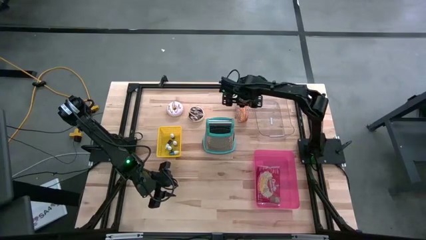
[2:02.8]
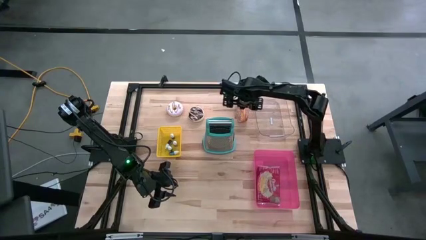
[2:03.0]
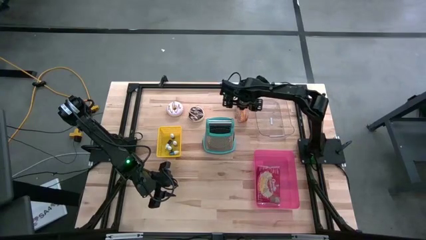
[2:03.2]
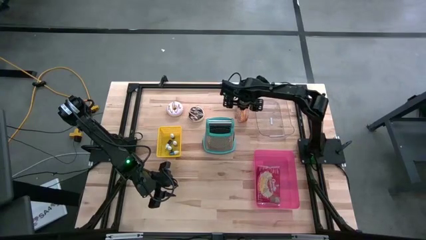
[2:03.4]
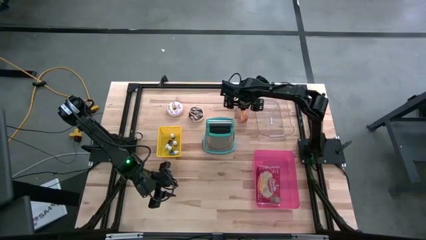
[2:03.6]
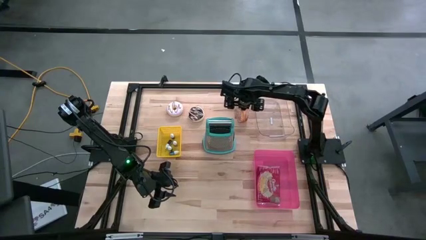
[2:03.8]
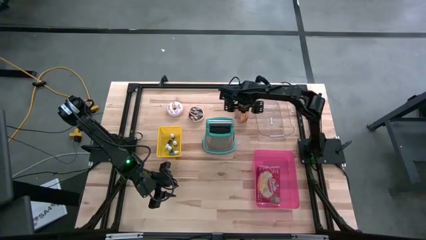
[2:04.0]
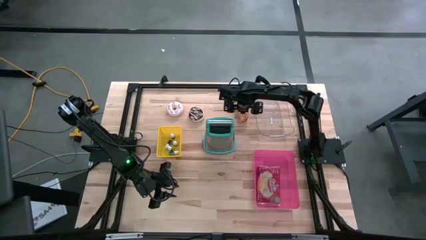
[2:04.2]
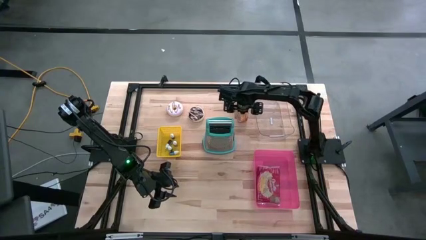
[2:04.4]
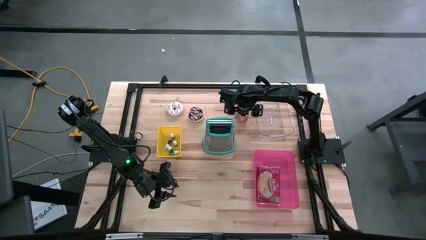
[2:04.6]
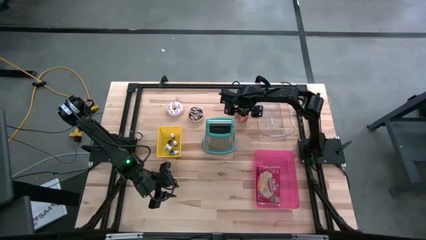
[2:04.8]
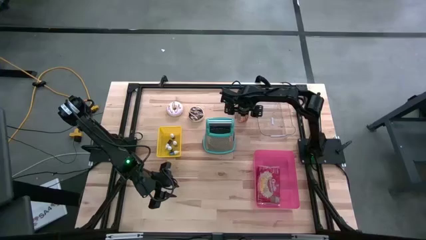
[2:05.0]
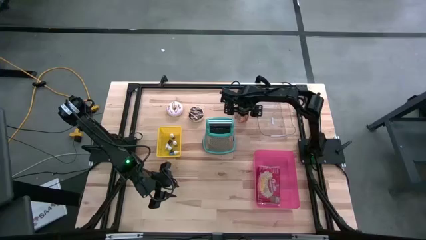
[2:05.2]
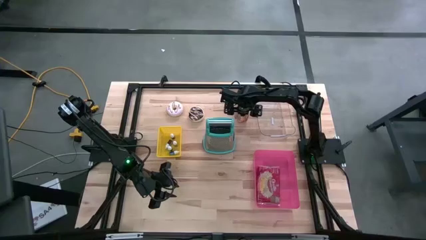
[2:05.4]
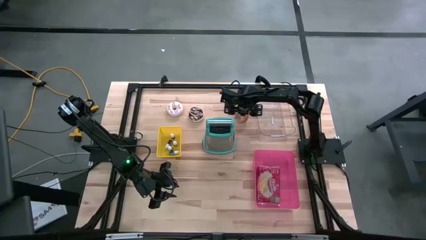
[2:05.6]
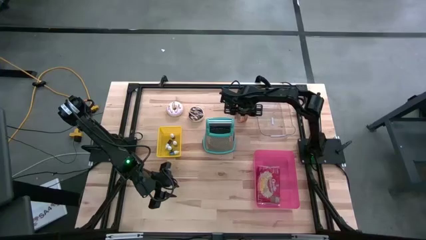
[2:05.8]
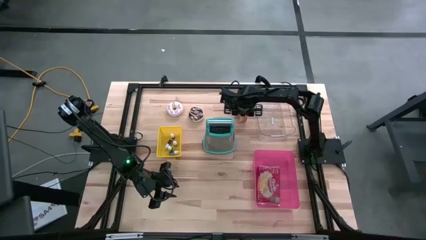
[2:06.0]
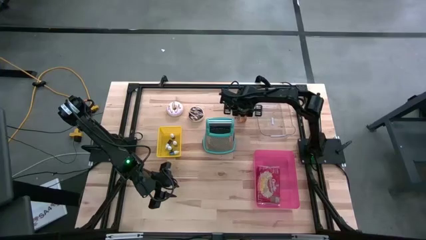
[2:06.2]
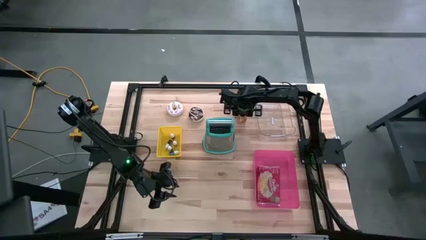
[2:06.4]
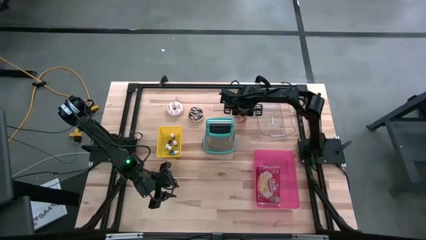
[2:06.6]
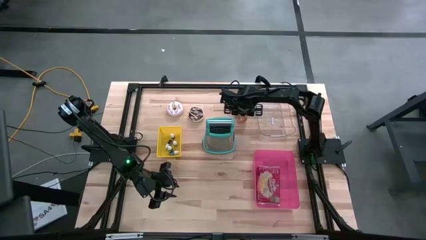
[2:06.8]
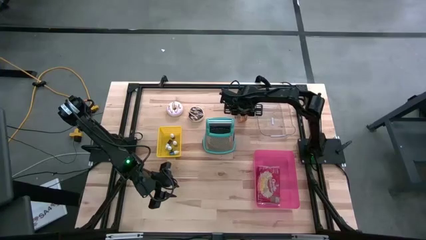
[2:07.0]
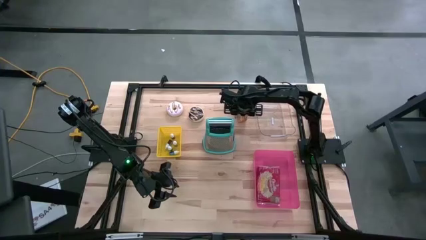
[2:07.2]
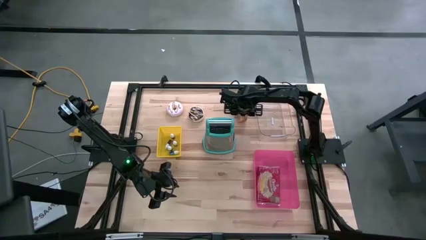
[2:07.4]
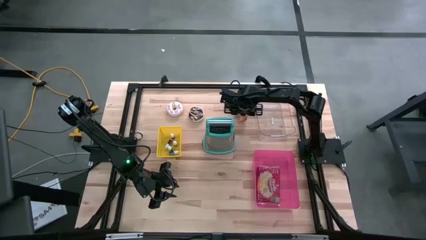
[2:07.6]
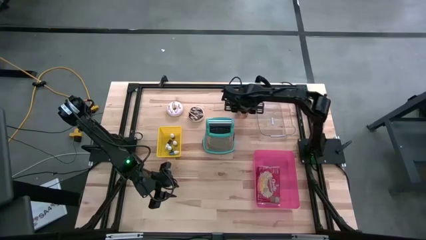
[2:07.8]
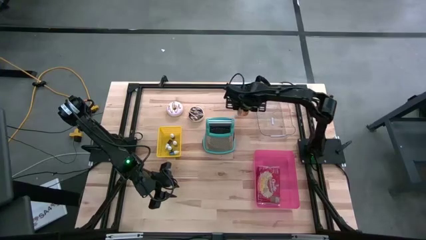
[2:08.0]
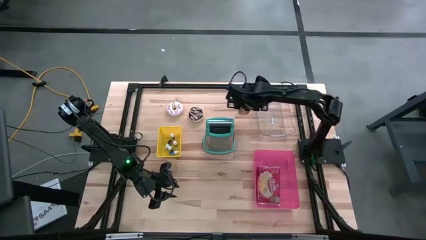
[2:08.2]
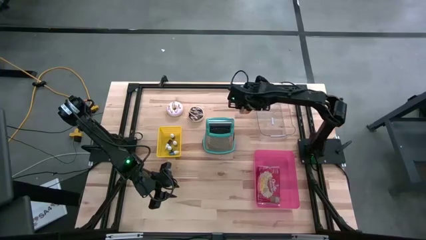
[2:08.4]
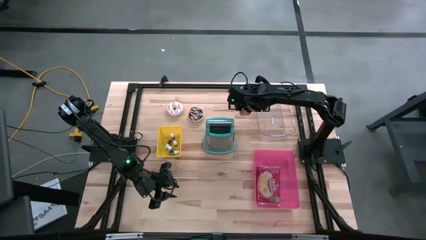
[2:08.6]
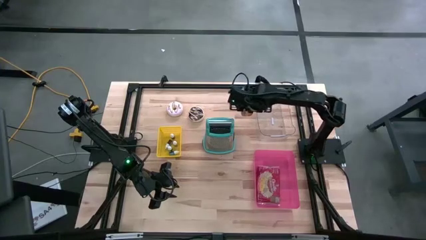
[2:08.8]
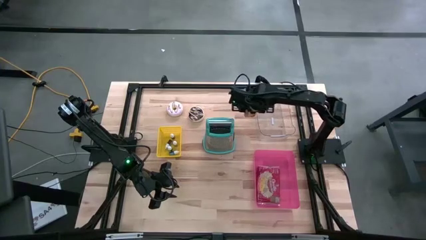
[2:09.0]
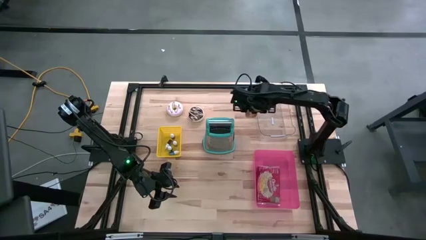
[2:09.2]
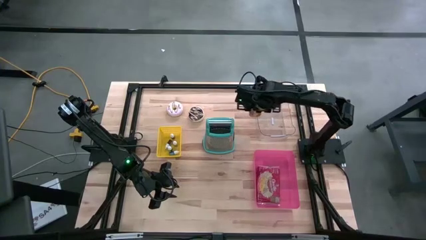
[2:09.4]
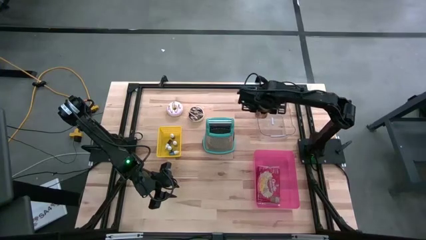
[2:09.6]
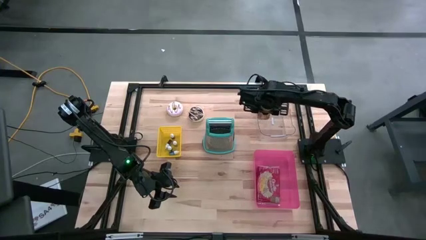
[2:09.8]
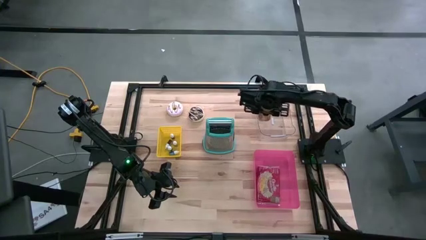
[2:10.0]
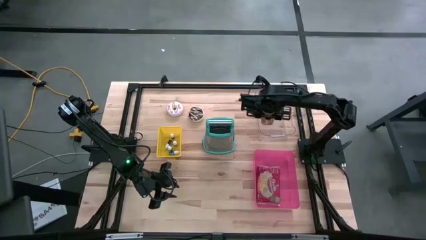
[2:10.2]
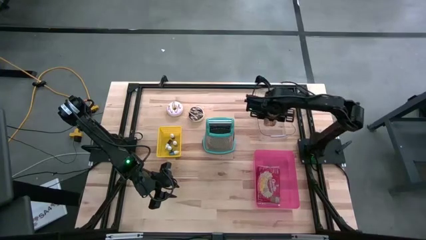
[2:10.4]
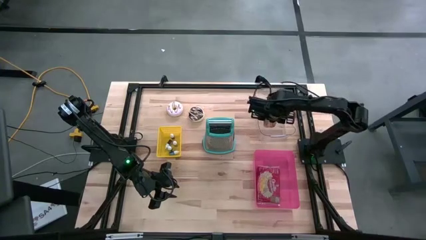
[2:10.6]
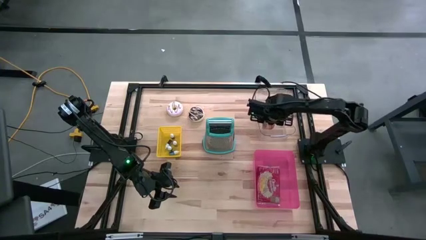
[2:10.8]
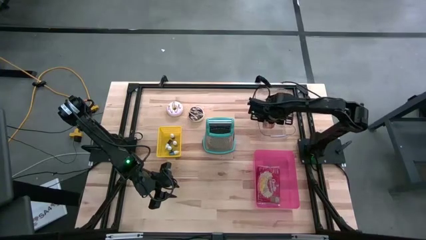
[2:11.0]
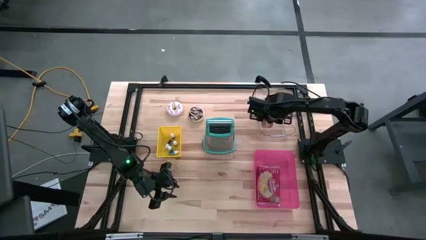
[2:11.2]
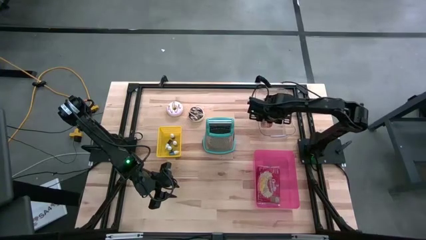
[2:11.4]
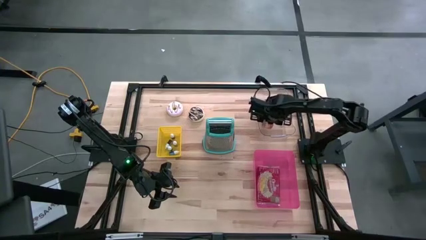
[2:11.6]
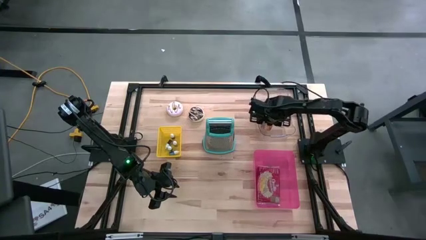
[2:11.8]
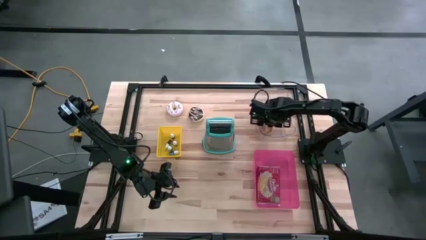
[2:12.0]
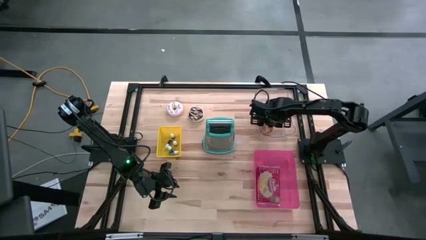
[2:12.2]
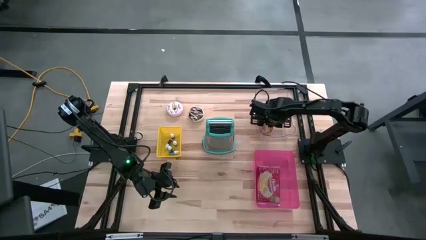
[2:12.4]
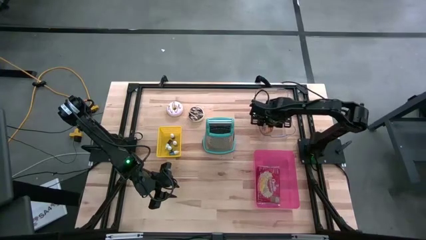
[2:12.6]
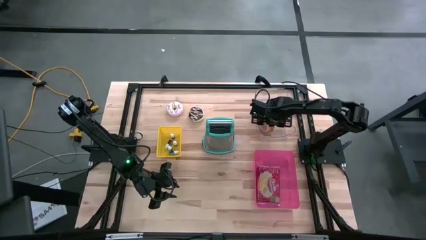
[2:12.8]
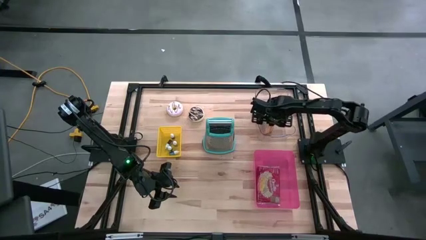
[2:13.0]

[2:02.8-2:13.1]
Put the bread into the transparent bin

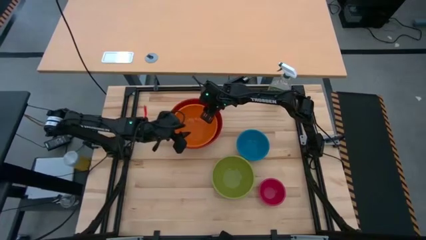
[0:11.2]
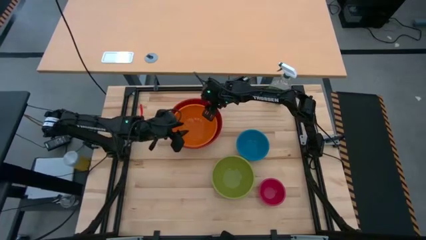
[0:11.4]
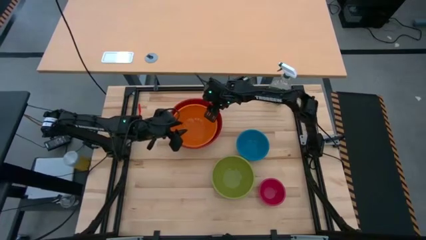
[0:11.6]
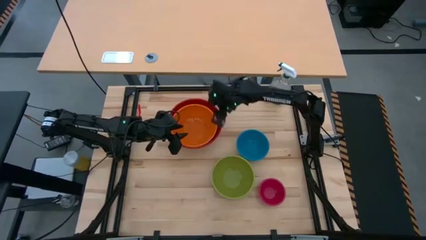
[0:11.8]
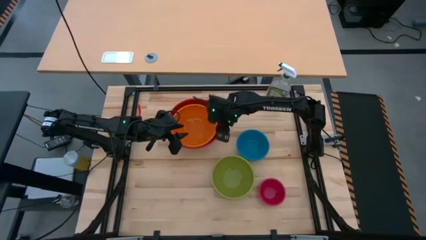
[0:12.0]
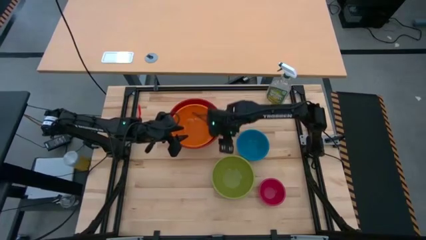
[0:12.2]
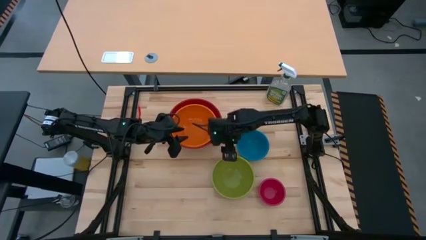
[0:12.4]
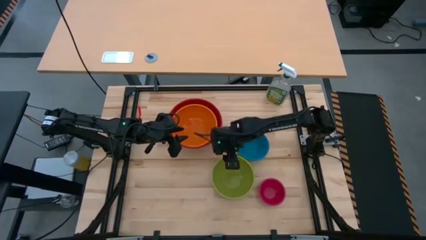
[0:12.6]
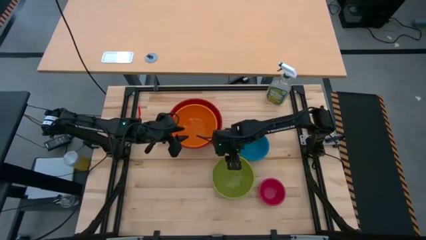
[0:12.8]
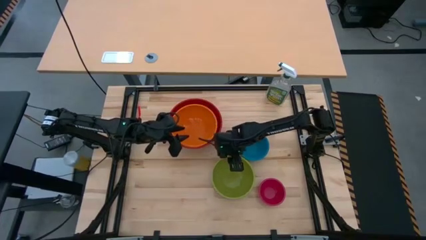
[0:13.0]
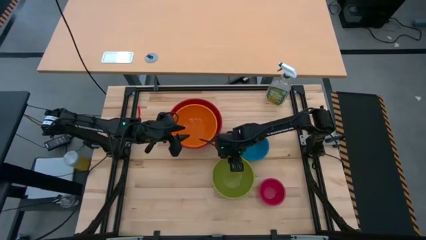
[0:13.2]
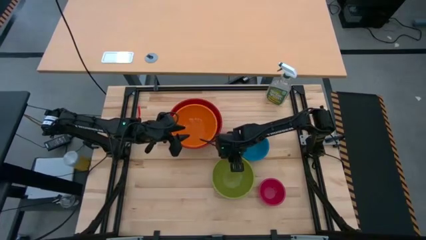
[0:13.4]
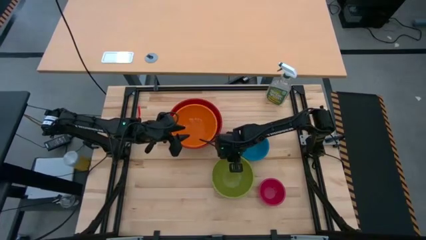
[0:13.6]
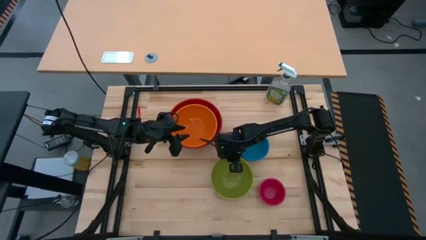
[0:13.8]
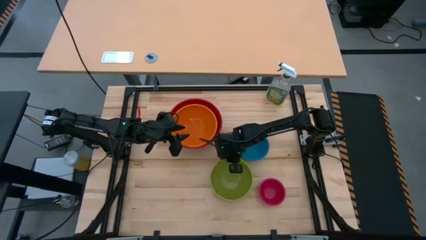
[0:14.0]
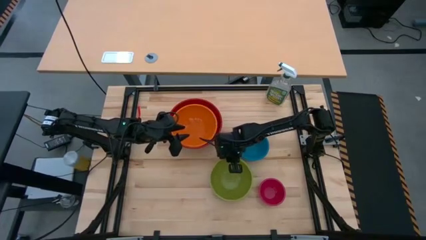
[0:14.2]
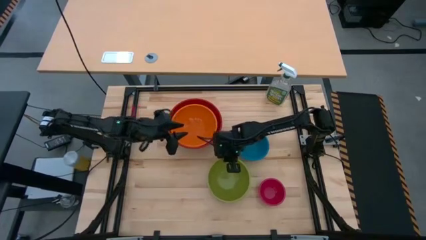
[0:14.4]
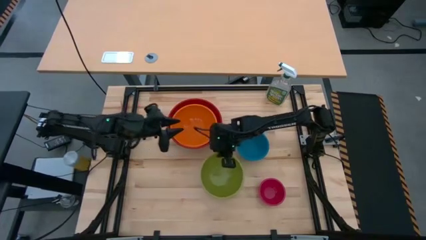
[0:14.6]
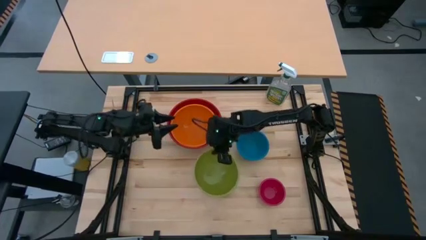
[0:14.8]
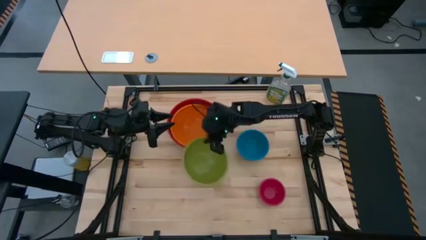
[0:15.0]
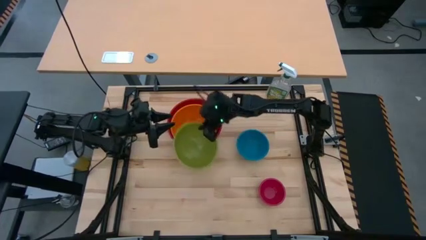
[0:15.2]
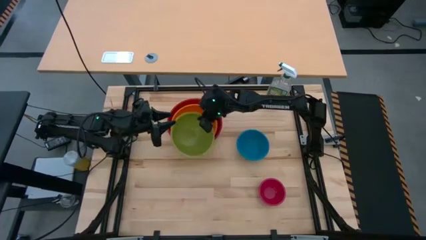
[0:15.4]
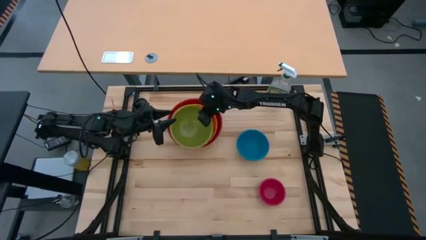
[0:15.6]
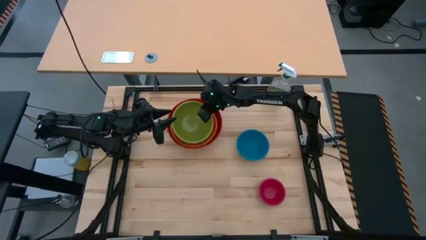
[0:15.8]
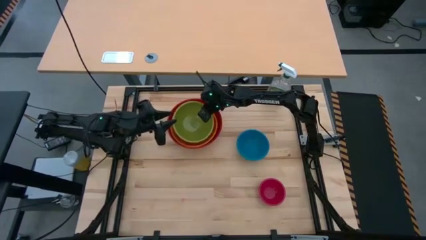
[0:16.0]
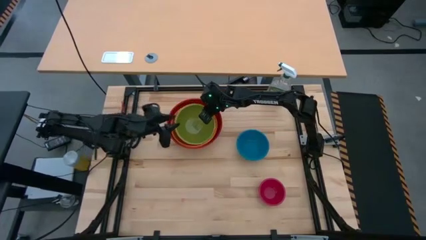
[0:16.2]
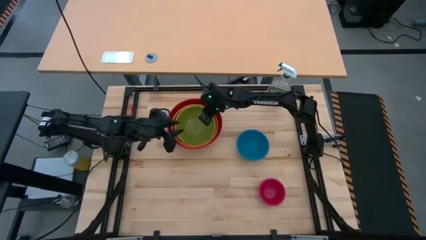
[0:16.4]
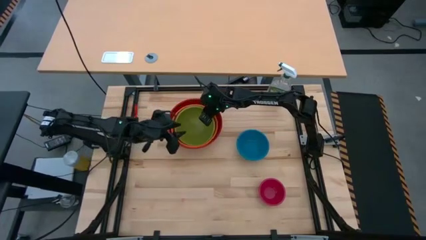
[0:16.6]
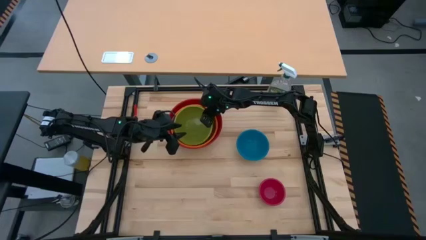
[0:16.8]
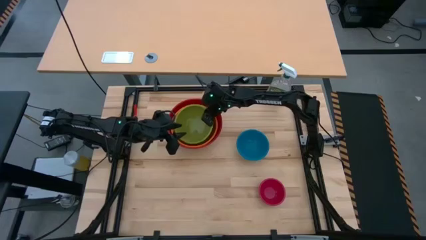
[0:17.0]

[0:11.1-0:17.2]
Stack the green bowl on top of the orange bowl
